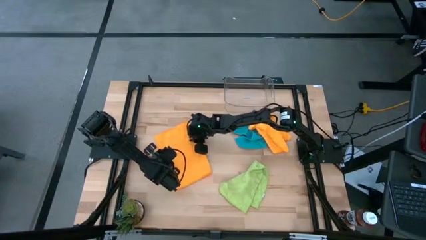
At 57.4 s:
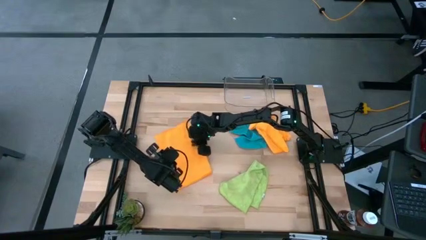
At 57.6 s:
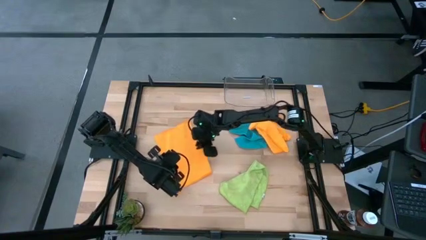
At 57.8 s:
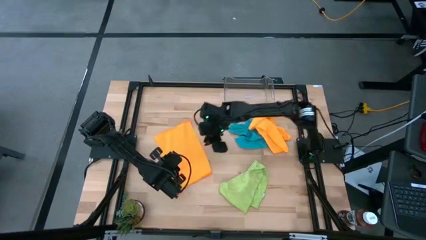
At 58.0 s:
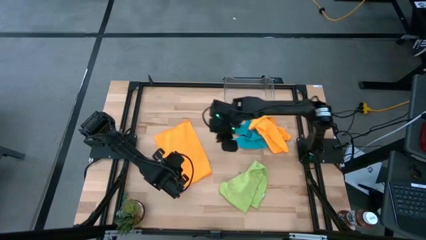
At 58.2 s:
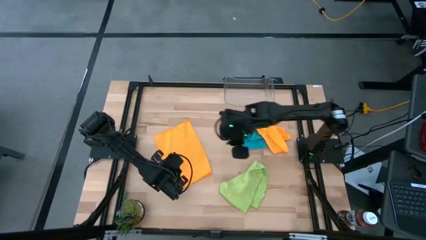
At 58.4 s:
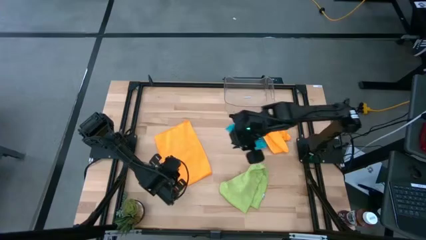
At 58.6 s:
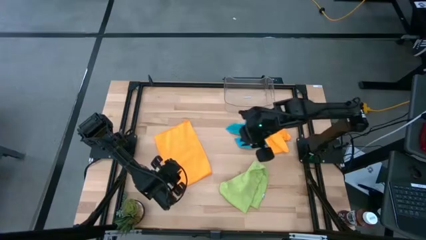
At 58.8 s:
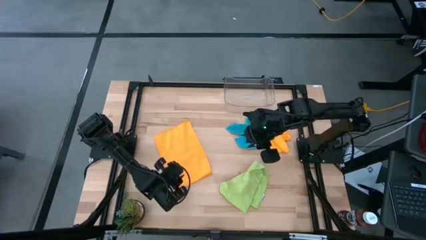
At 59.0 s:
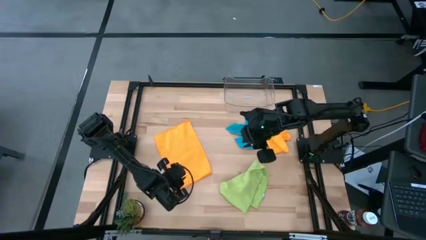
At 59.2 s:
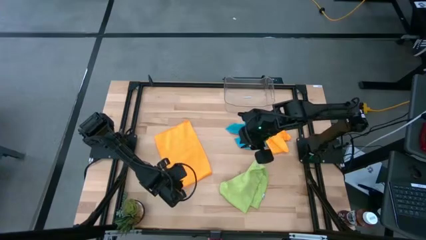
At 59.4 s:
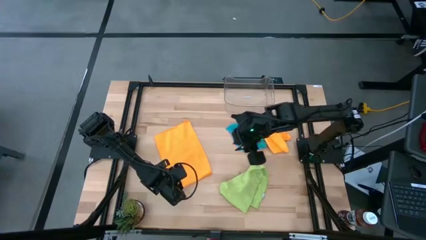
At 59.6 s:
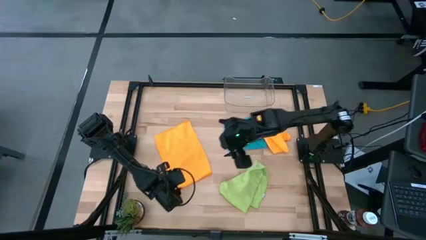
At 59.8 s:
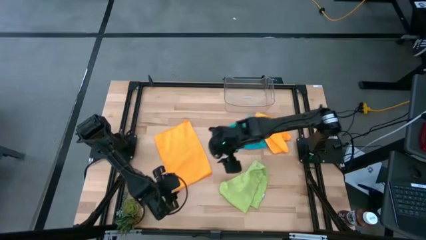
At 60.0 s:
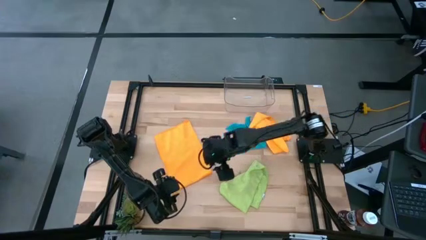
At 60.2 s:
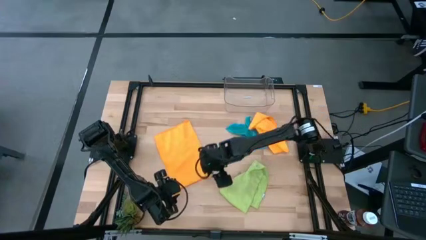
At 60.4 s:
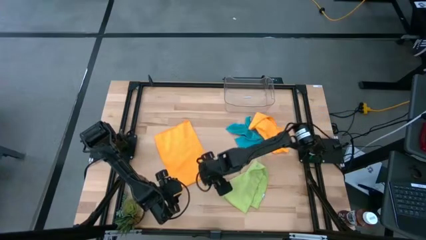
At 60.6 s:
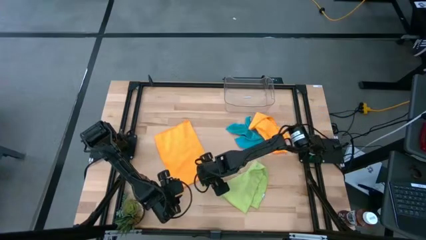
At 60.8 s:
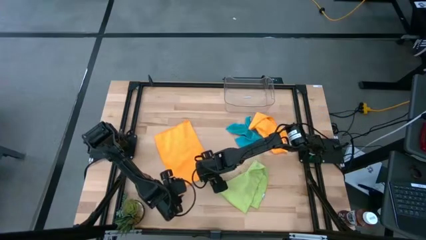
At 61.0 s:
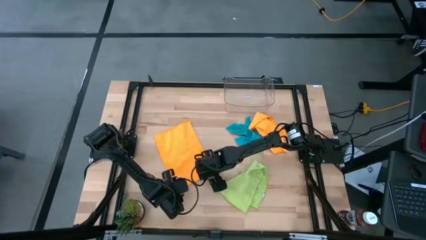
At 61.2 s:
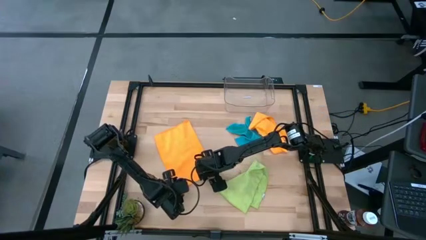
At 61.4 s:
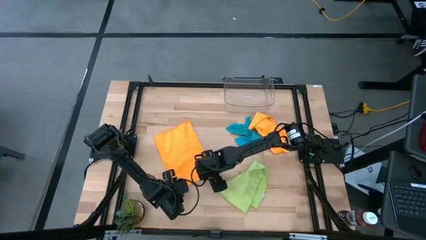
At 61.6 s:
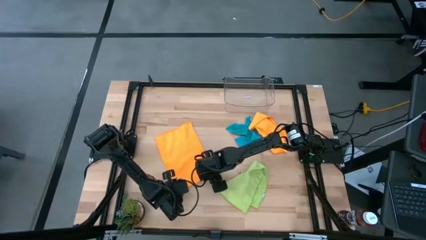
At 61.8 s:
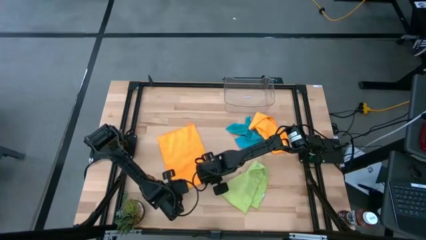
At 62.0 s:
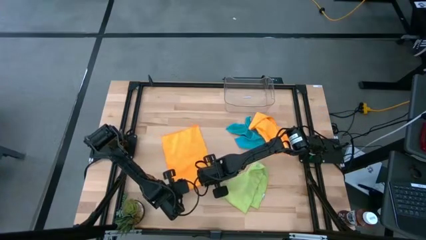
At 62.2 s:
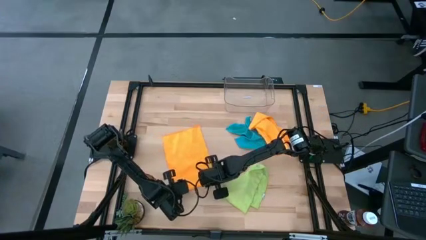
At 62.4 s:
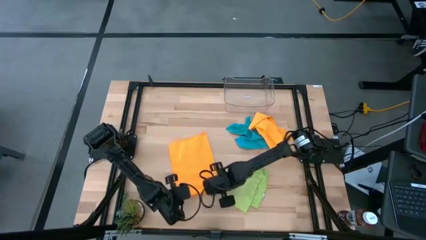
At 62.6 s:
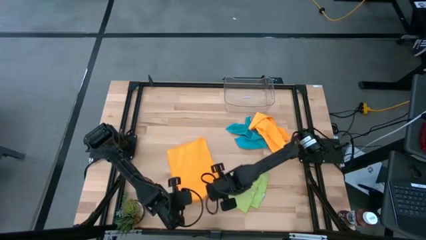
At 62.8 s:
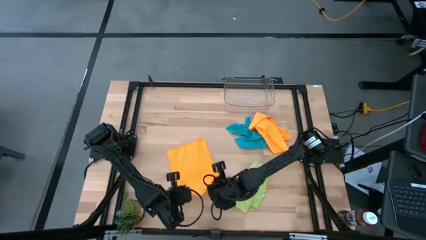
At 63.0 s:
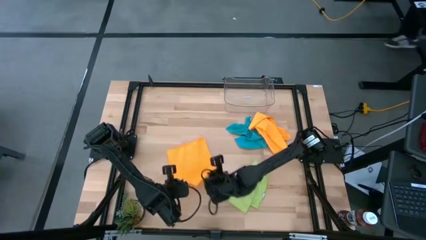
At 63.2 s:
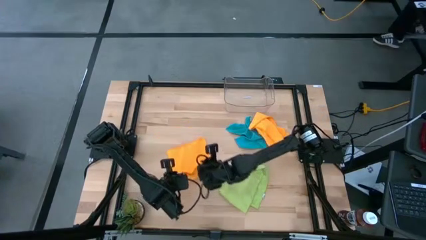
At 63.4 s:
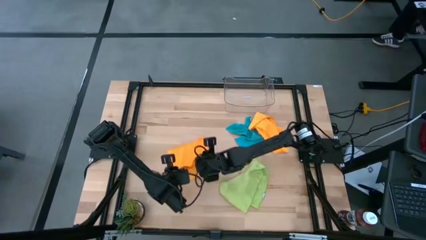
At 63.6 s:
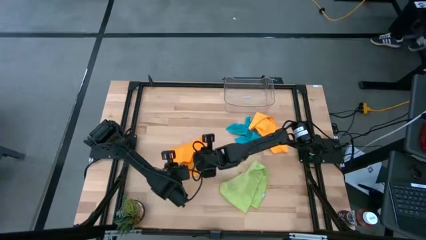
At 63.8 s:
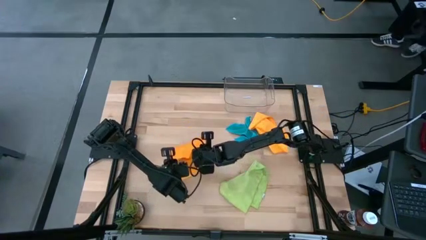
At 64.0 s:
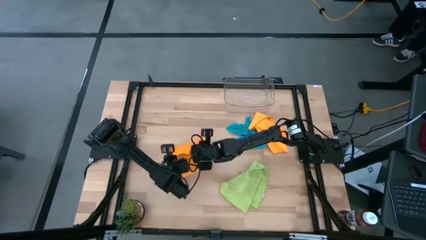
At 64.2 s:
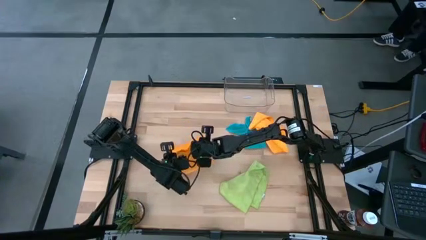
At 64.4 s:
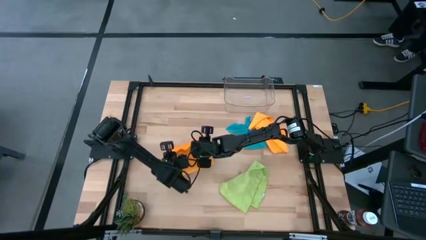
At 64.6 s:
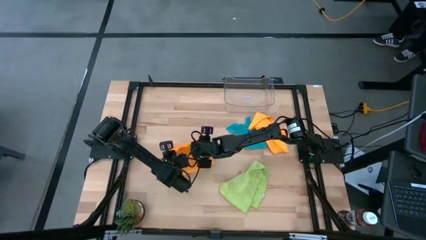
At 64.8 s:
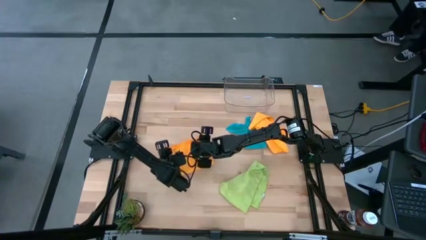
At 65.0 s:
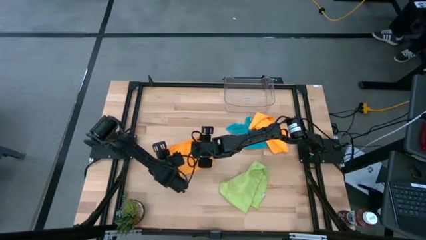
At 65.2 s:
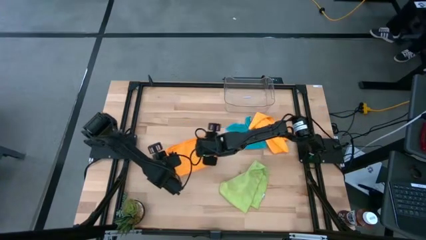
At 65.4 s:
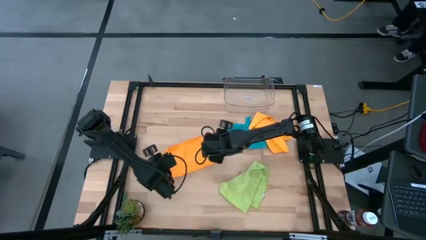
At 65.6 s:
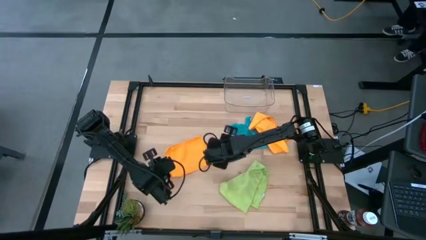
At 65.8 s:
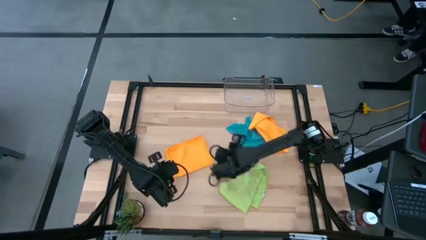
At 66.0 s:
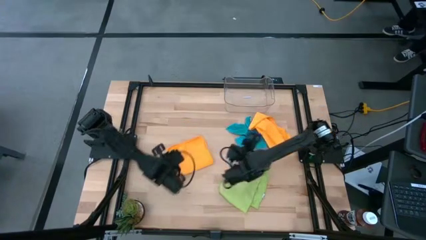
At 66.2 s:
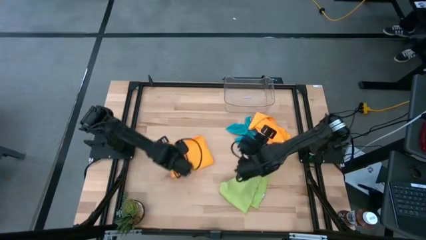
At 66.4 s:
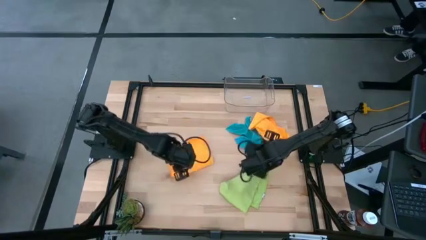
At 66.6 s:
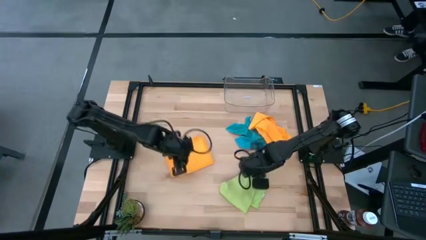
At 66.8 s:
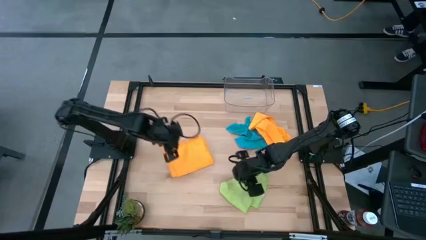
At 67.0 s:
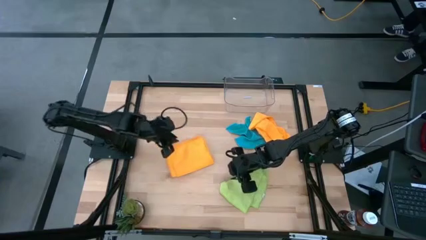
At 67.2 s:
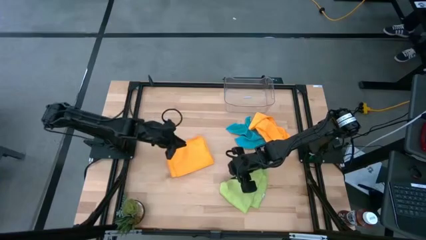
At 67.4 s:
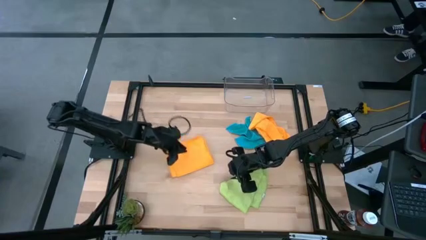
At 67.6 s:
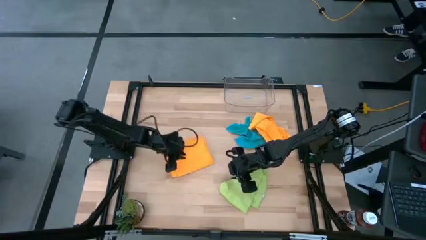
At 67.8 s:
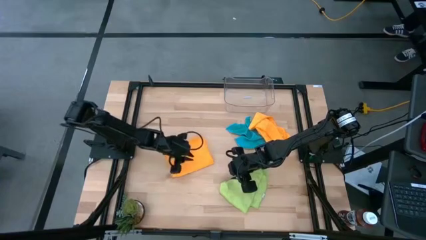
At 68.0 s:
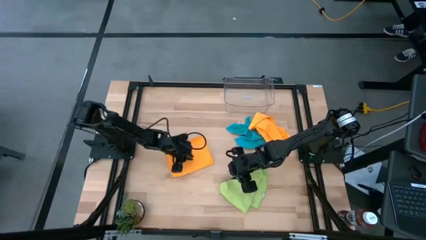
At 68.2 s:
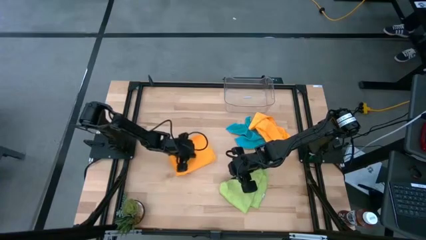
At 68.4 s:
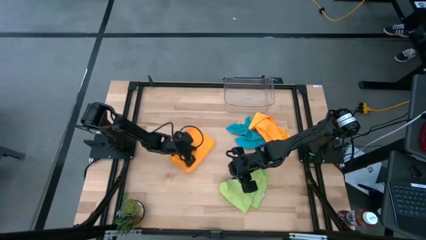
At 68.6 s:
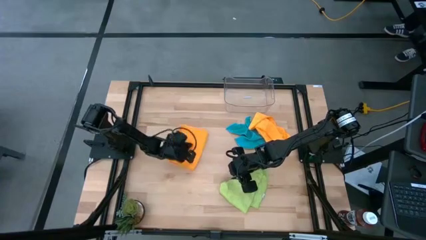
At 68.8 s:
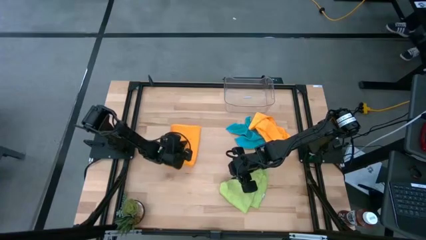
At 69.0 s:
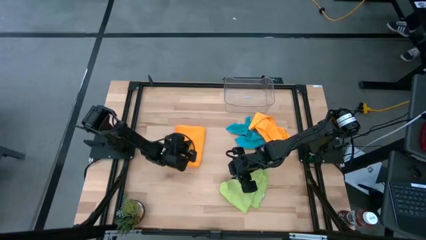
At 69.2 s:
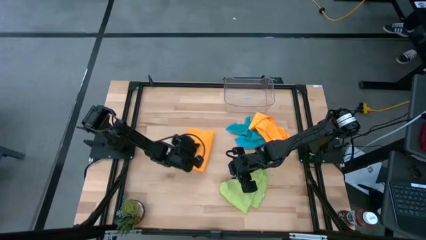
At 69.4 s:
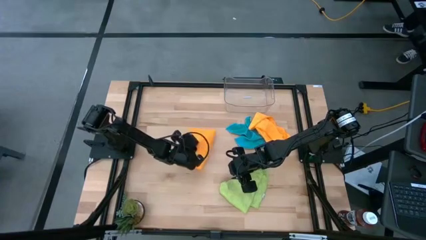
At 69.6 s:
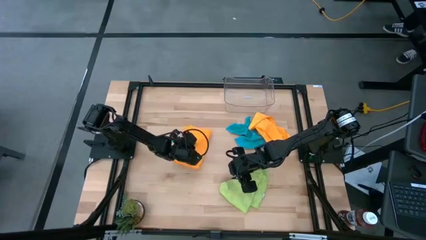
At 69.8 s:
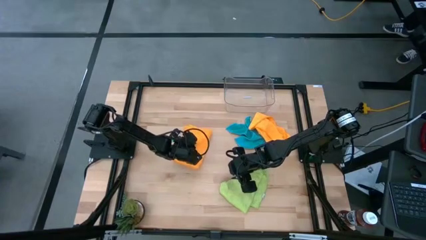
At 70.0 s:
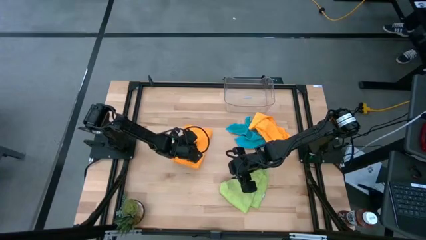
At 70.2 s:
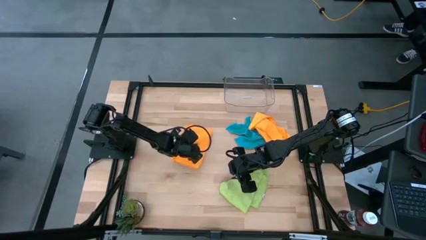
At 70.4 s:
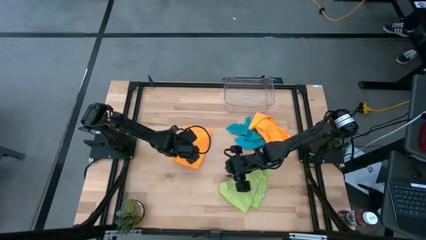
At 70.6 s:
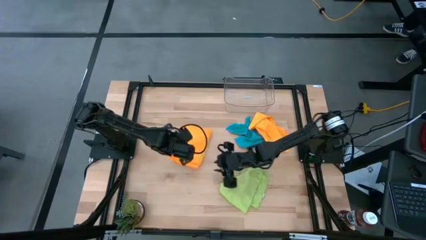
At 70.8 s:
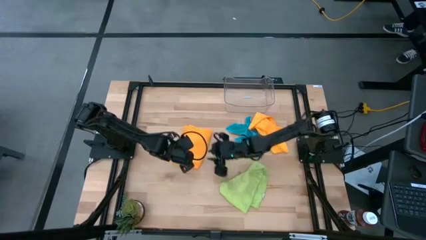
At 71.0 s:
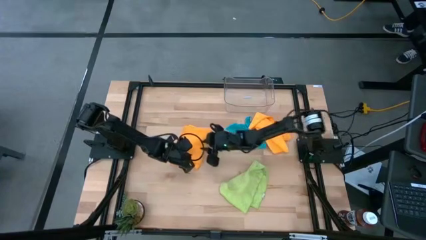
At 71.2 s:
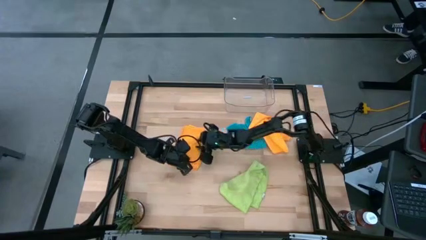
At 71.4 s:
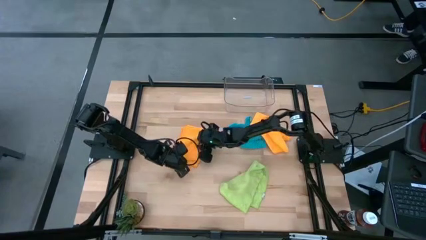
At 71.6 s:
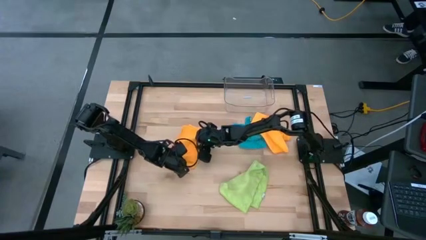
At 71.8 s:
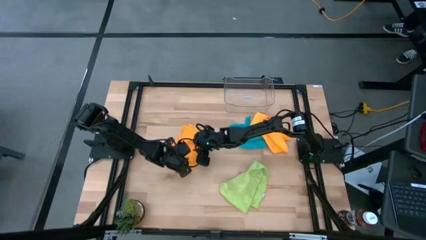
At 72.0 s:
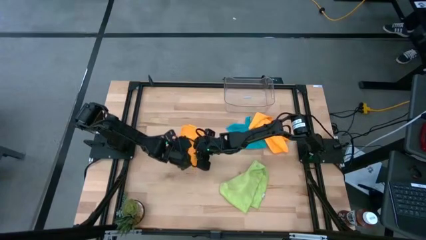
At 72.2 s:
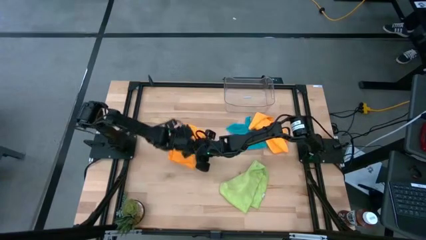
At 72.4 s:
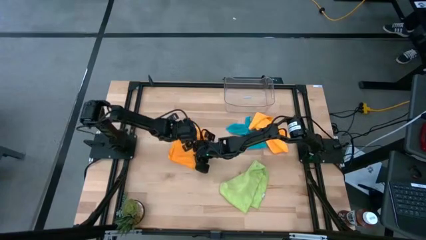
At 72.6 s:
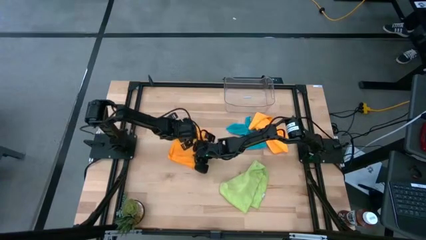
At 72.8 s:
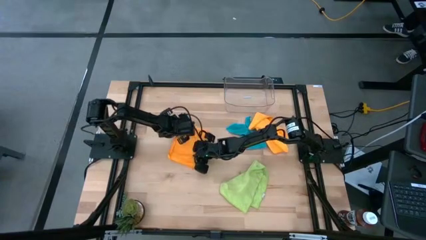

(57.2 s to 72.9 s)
Task: Fold microfiber towels
Fold the left yellow microfiber cloth
